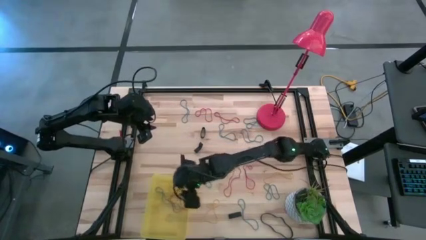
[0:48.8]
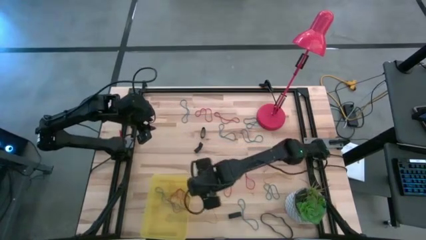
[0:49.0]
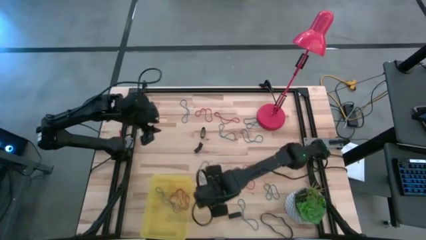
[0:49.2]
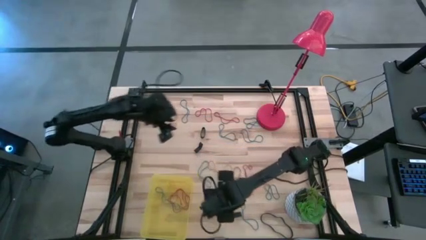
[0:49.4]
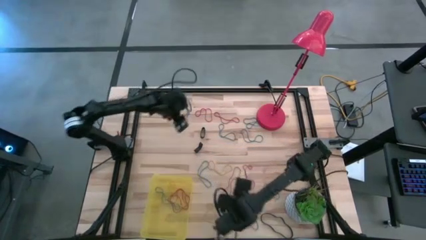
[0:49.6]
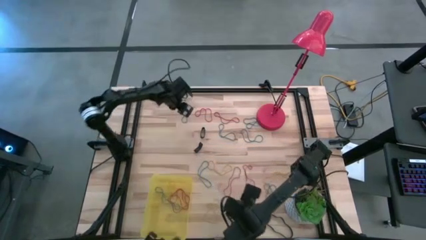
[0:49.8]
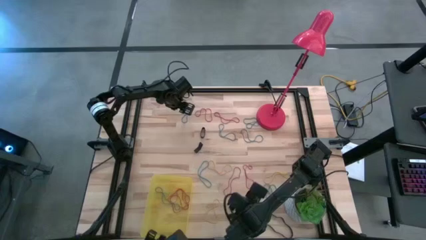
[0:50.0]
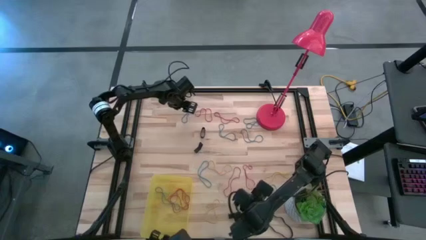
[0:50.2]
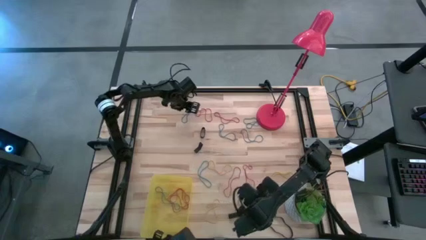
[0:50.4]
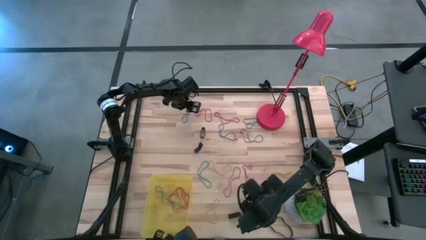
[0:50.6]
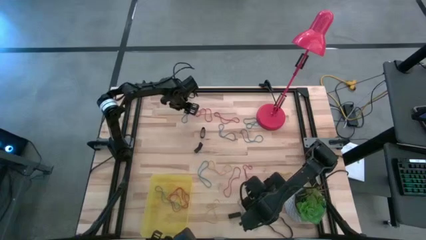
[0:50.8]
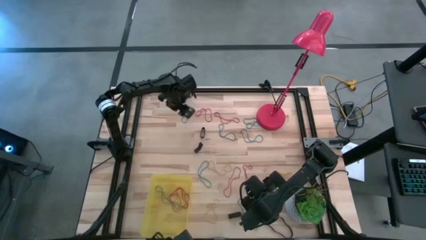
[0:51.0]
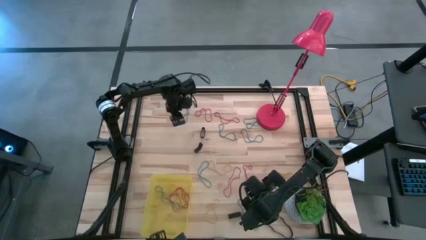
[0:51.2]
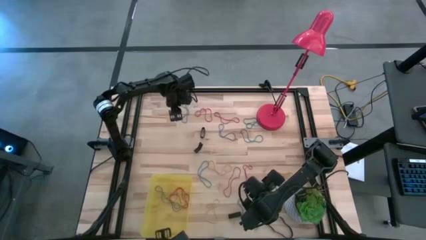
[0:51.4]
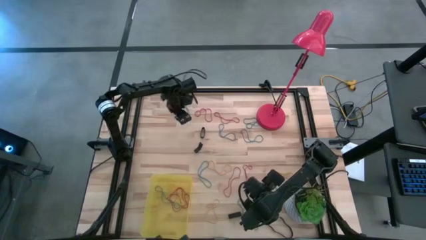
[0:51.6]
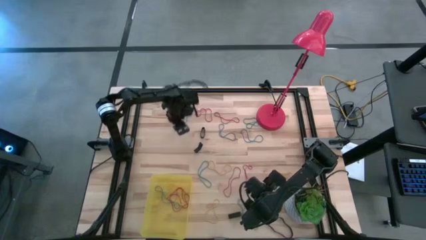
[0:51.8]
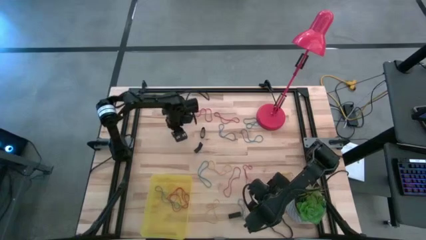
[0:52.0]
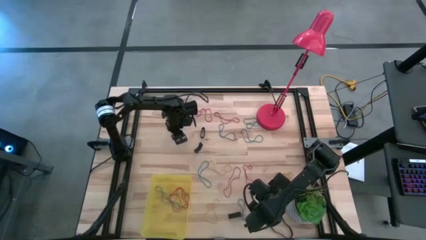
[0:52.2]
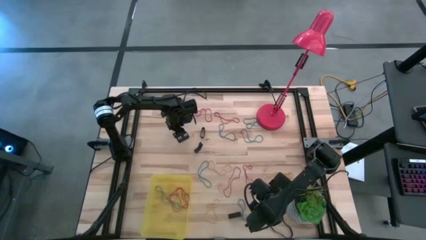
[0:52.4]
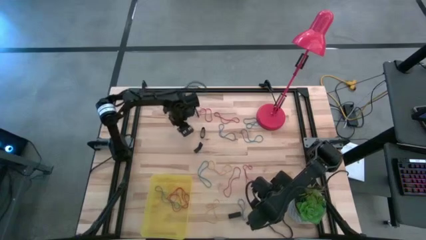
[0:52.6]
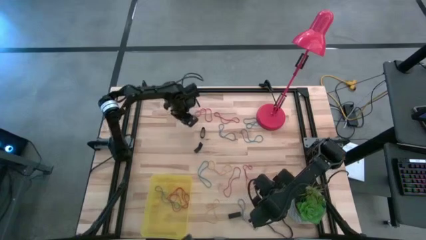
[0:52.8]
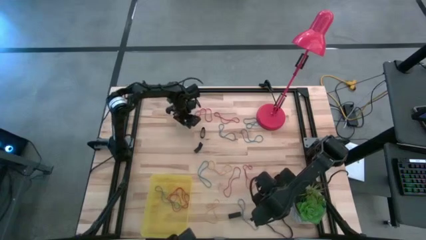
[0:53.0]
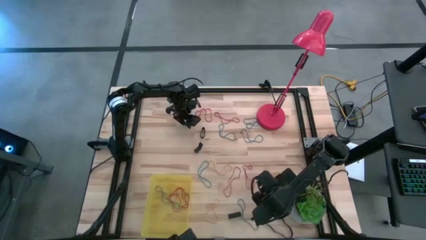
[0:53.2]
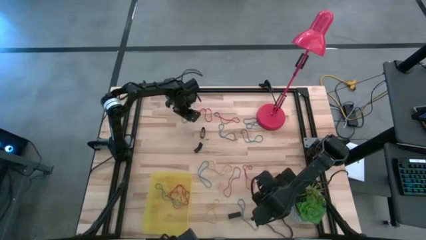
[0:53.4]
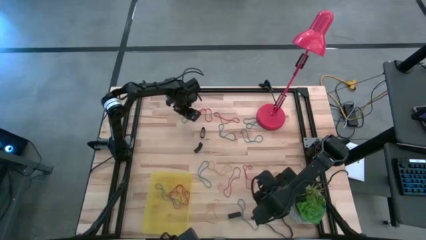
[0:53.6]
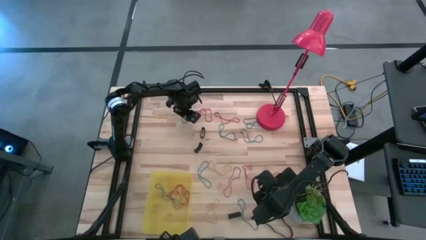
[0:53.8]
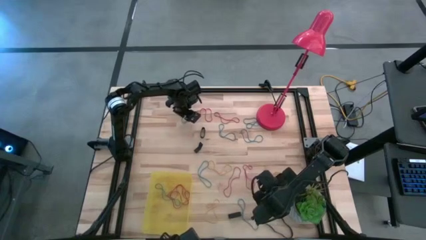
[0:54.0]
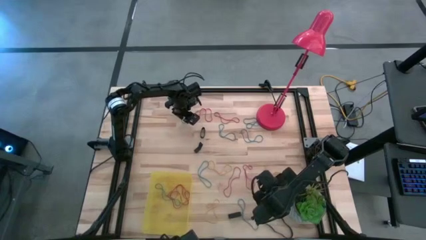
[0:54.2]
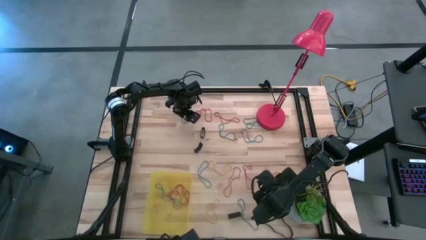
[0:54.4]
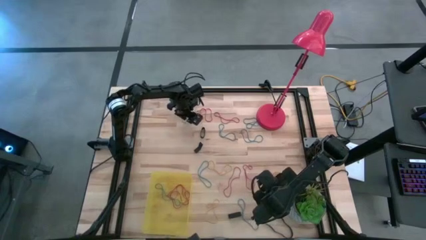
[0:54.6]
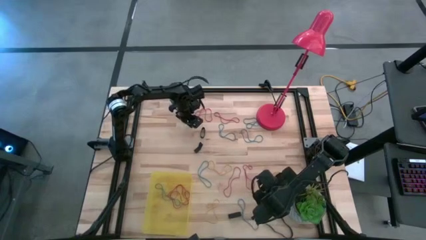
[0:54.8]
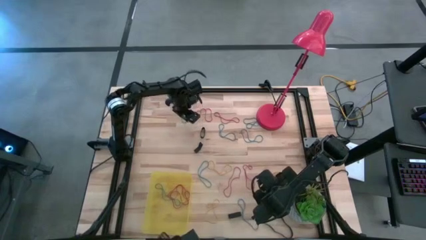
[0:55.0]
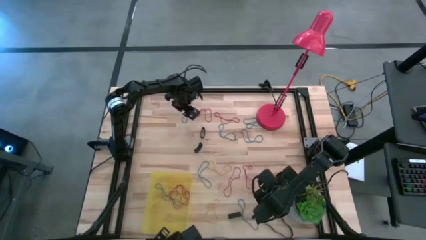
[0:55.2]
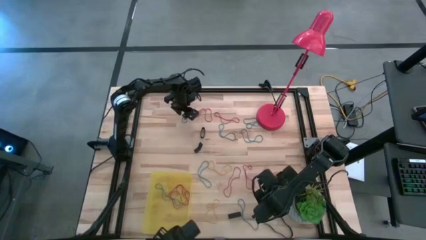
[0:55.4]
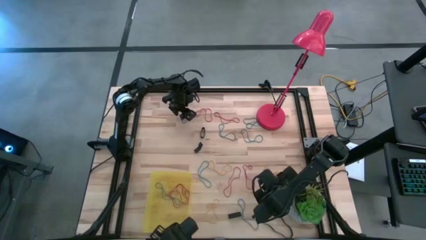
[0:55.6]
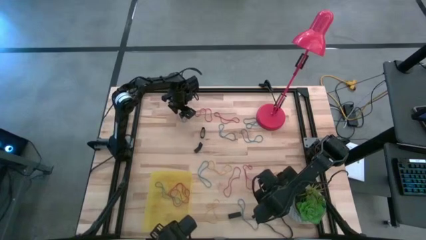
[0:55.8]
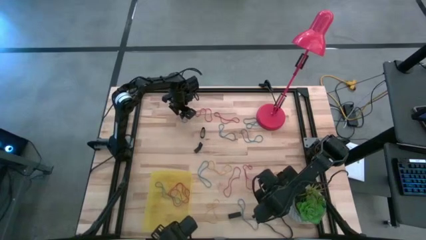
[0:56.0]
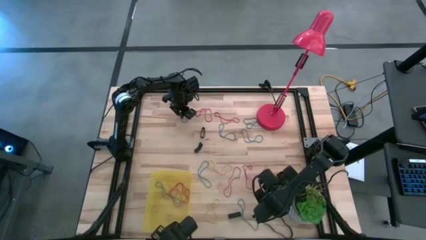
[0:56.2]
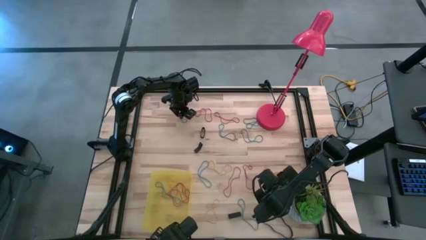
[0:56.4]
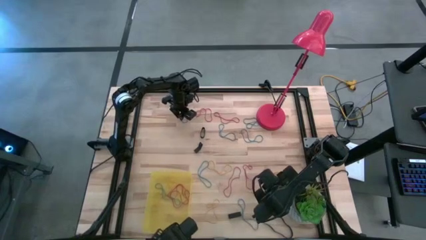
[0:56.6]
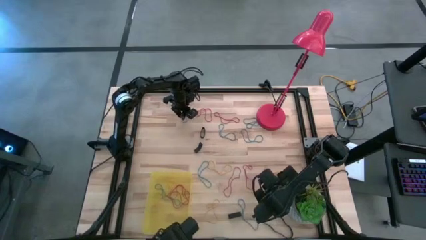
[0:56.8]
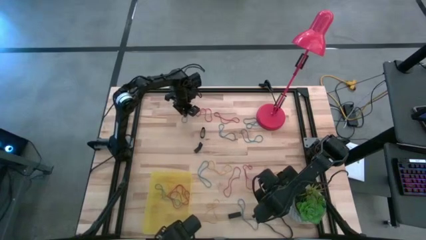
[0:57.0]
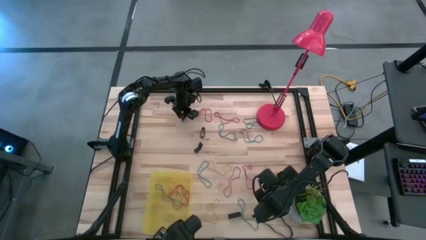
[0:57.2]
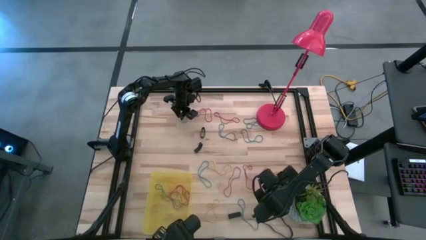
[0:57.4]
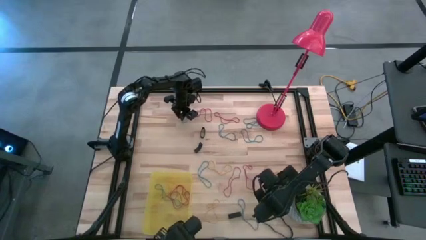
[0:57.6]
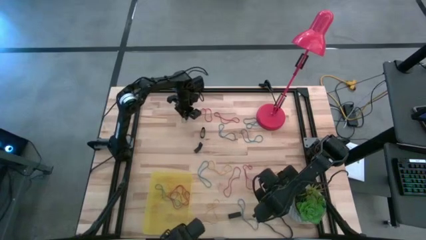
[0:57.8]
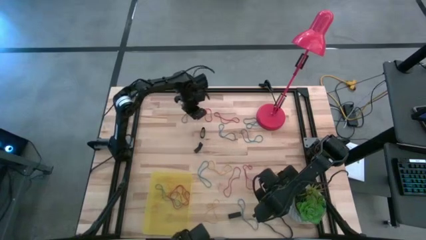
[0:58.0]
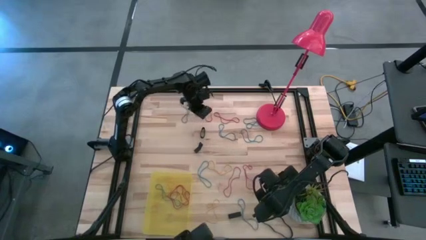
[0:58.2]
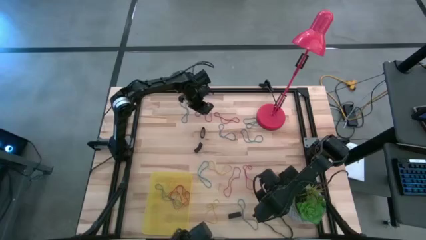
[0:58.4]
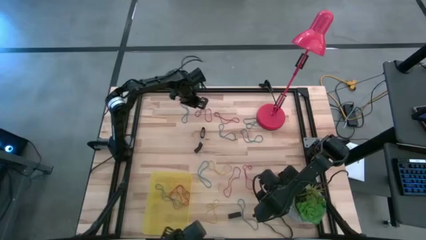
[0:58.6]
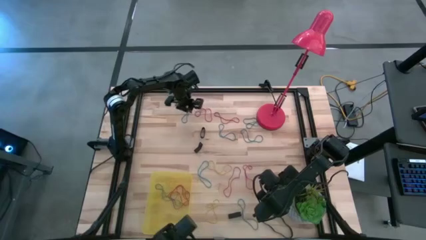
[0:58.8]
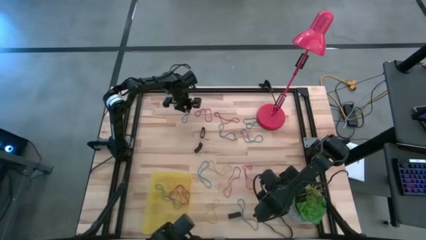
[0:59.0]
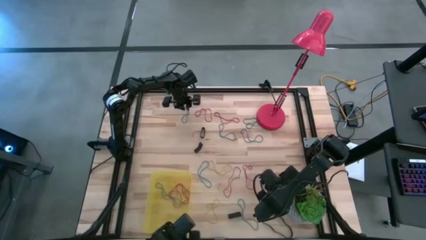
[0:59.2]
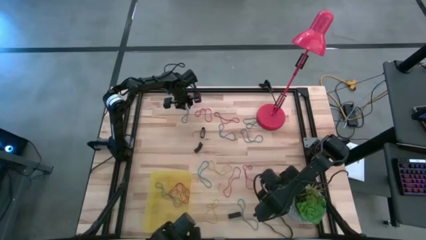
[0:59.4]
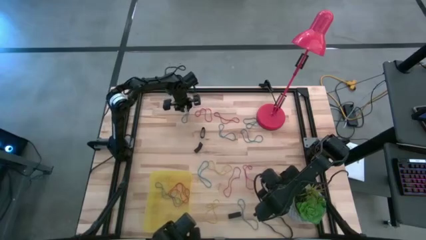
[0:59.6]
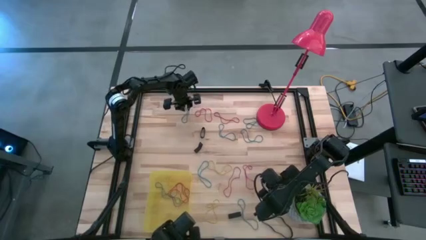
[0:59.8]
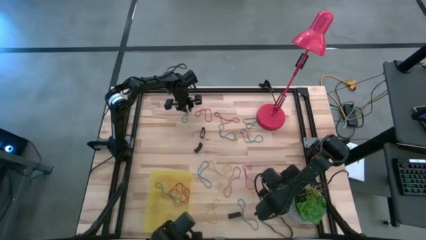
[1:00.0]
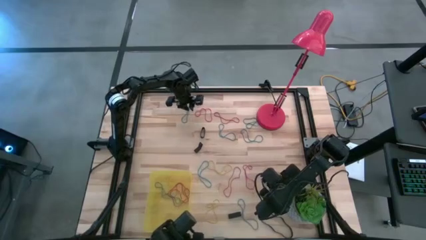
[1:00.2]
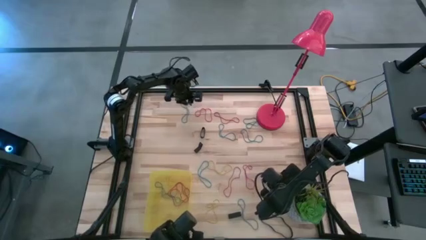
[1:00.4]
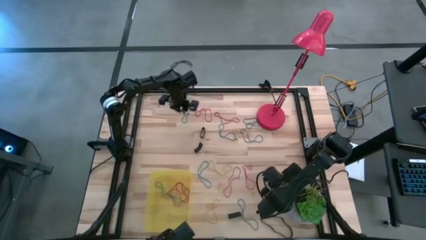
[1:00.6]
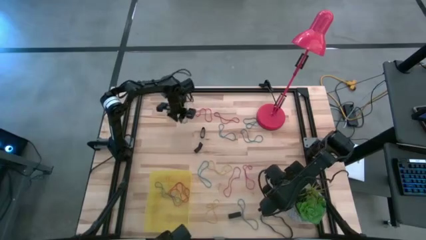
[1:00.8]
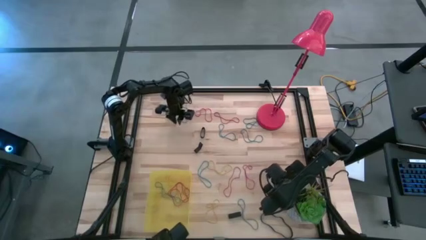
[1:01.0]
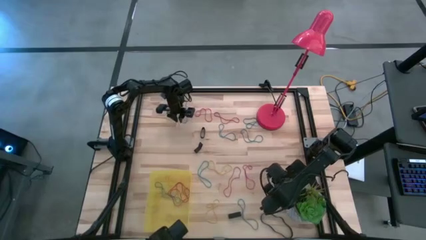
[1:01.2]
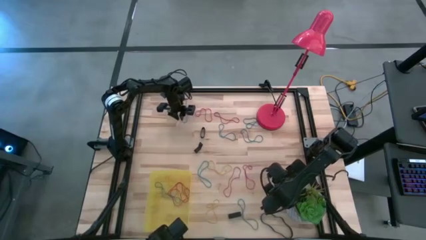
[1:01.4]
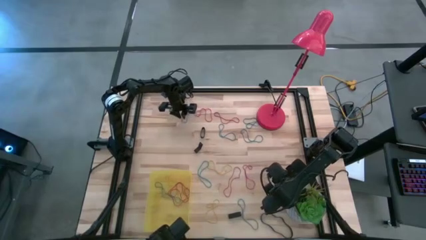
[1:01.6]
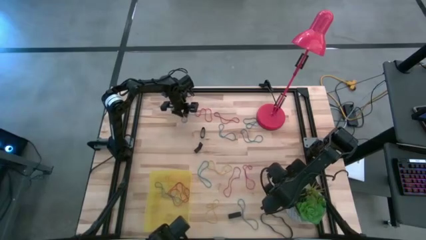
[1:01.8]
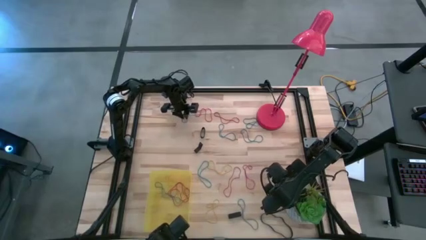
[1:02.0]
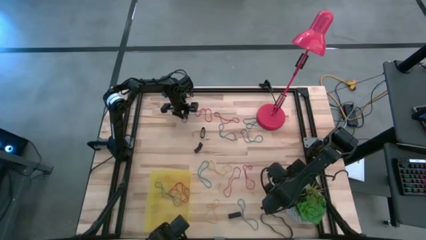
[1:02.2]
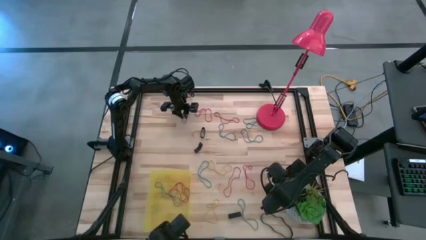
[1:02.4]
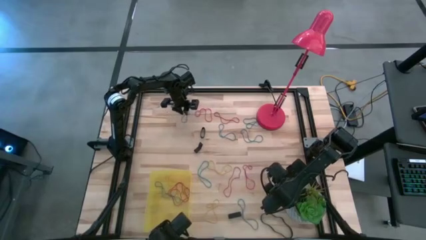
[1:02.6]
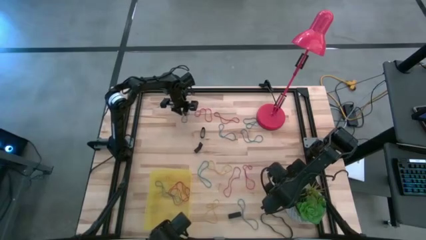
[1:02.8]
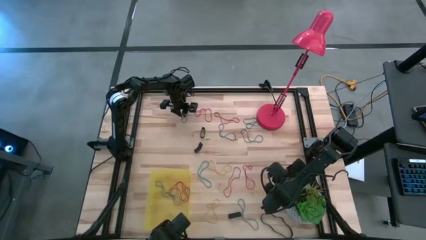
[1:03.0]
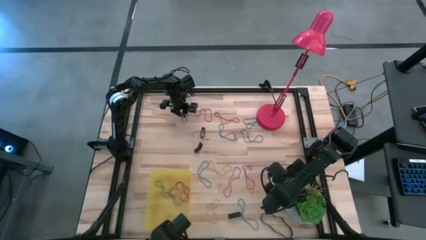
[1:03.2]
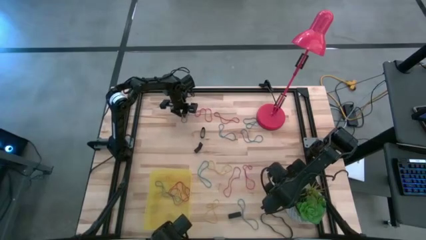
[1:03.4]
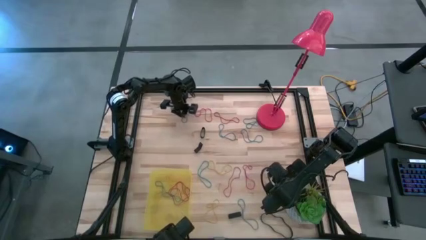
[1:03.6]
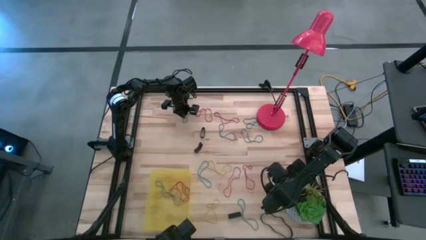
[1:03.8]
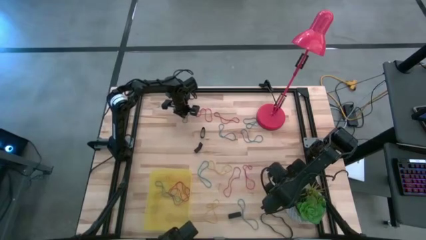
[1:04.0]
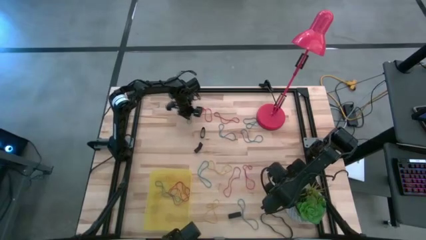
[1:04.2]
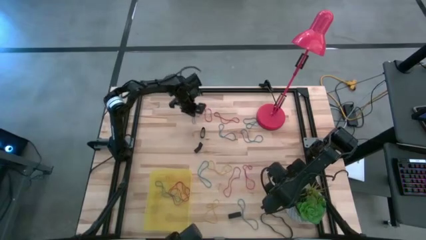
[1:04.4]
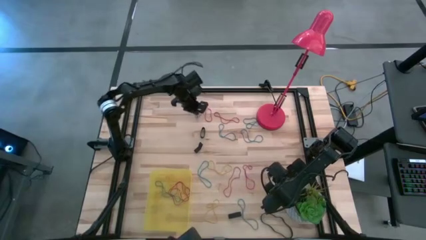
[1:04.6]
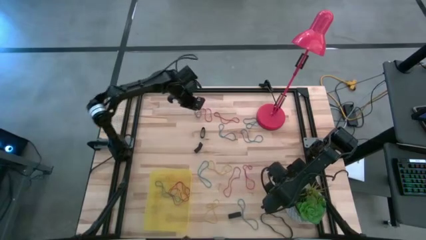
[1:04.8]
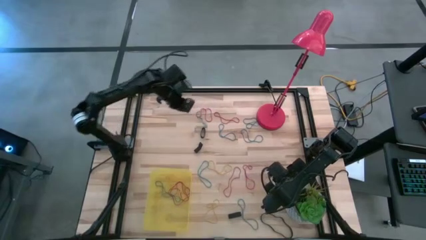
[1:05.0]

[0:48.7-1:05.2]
Task: Pick and place rubber bands into bin
Put the blue rubber band into the bin

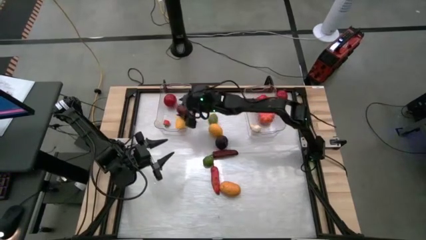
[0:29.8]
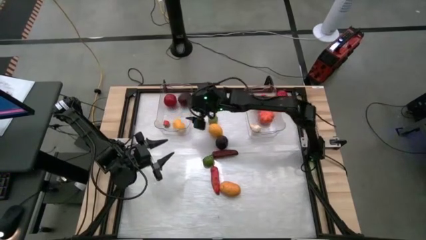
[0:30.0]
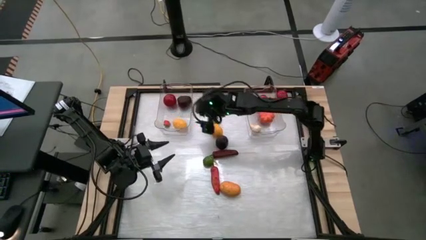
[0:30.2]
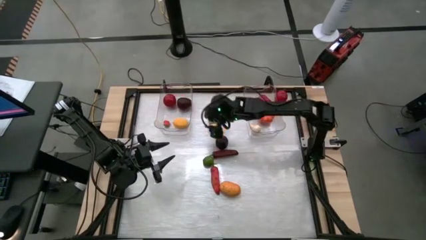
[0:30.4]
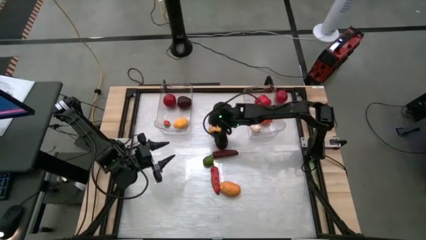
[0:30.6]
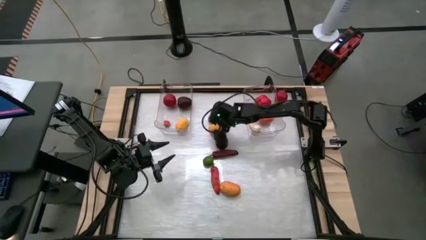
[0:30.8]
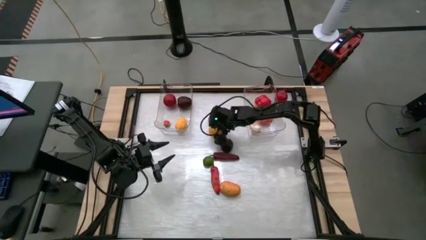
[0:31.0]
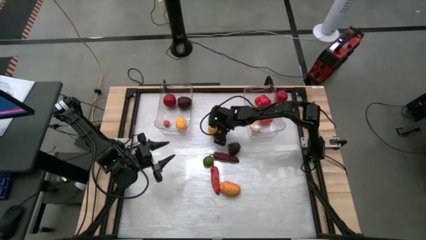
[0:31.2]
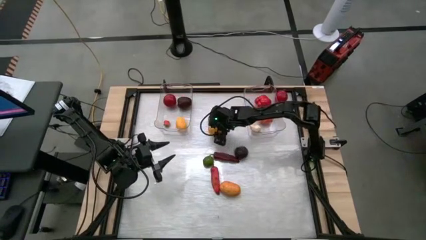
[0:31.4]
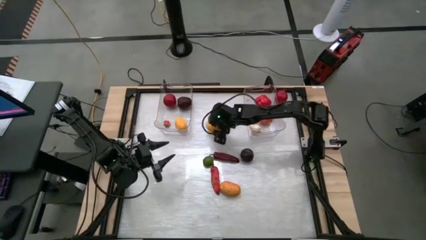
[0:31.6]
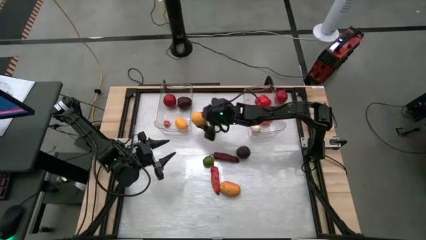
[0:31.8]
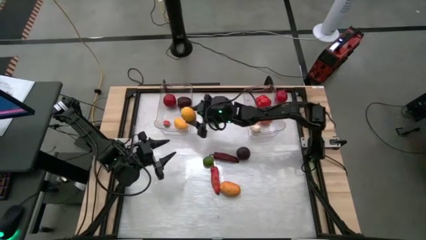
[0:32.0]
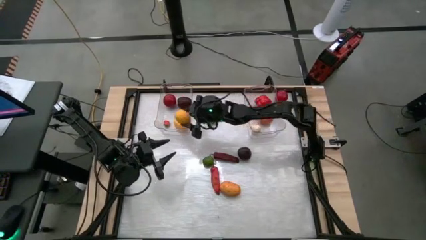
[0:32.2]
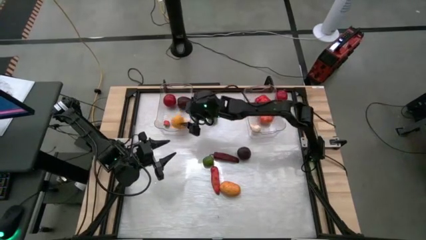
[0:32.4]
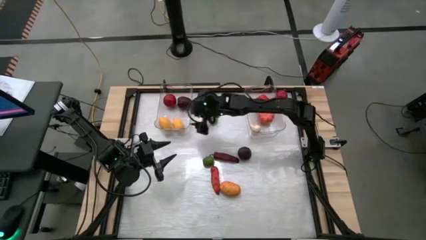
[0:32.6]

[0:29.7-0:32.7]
Task: Sort produce into baskets
Put the lemon into the left transparent bin
